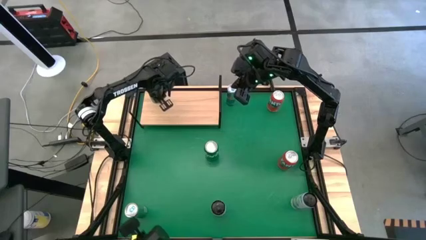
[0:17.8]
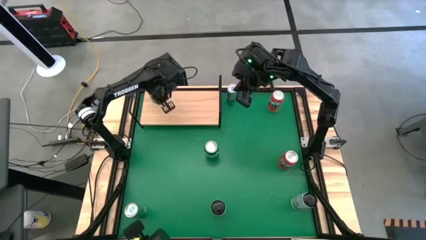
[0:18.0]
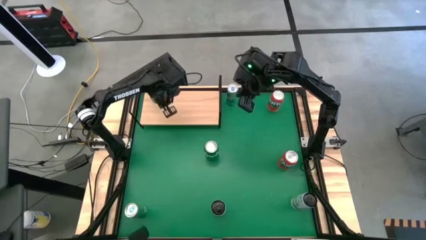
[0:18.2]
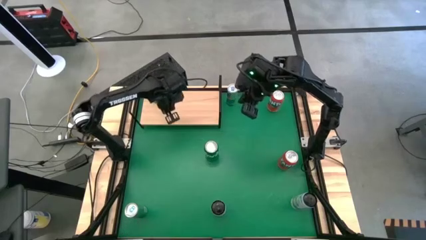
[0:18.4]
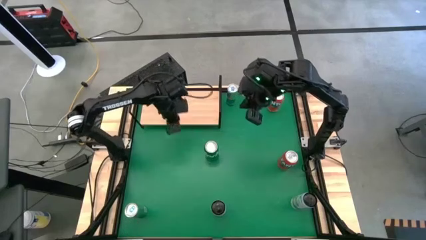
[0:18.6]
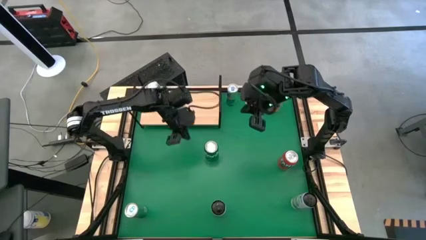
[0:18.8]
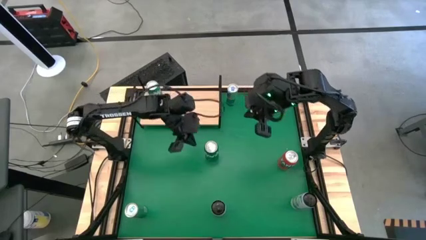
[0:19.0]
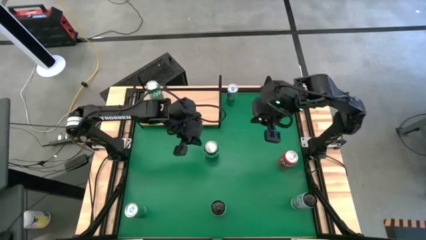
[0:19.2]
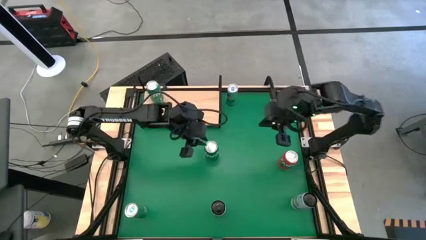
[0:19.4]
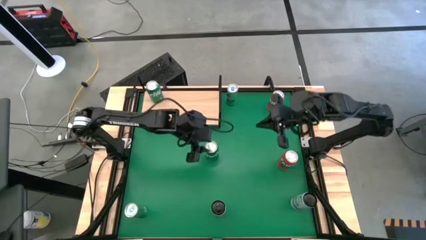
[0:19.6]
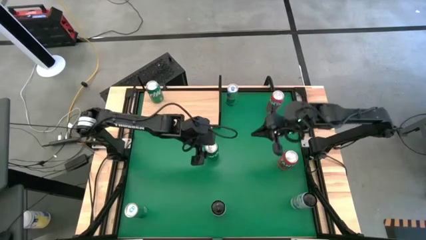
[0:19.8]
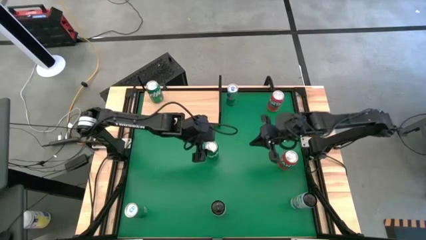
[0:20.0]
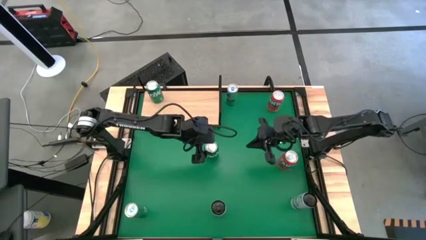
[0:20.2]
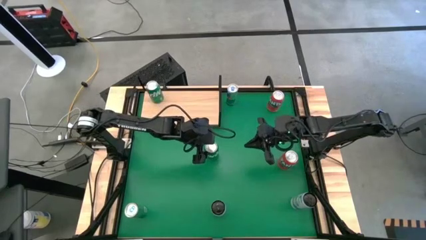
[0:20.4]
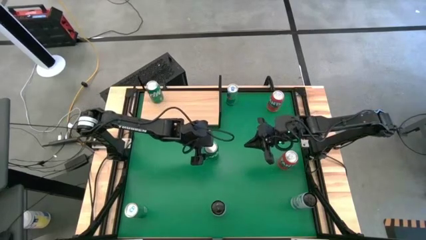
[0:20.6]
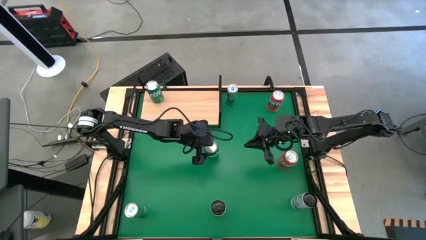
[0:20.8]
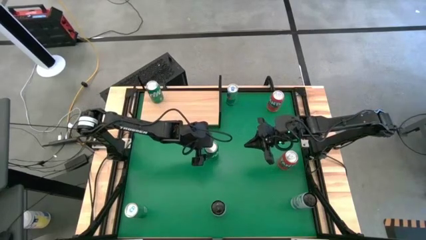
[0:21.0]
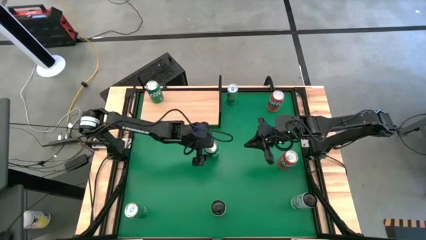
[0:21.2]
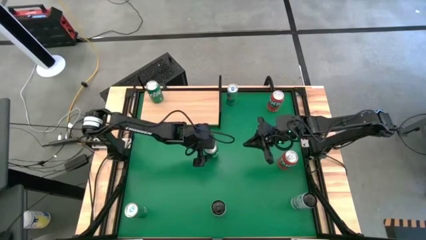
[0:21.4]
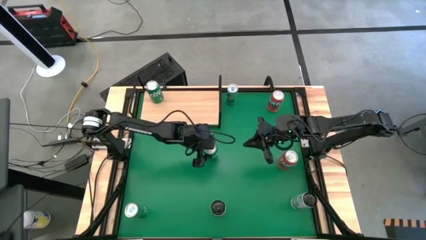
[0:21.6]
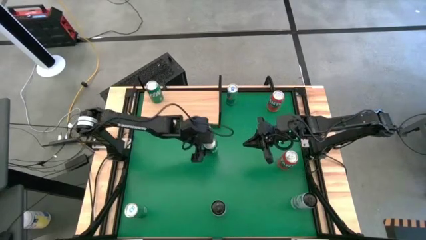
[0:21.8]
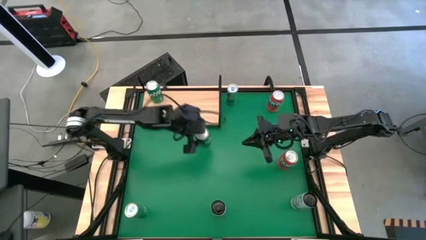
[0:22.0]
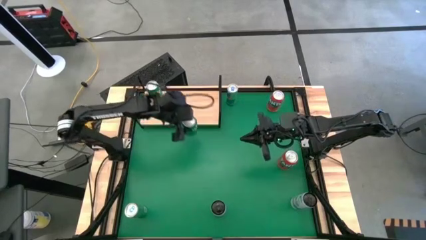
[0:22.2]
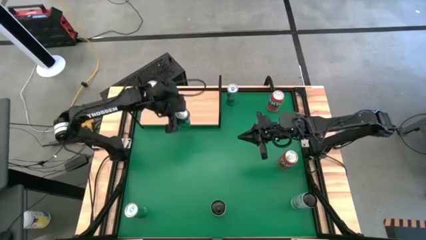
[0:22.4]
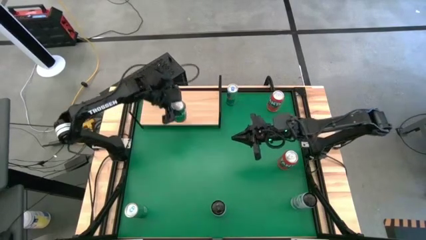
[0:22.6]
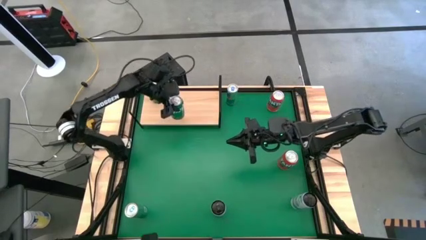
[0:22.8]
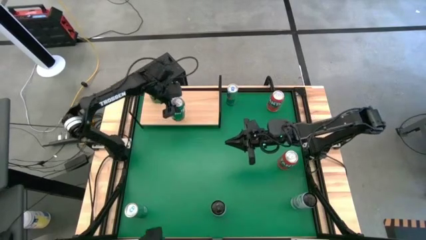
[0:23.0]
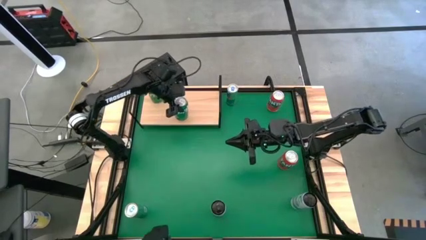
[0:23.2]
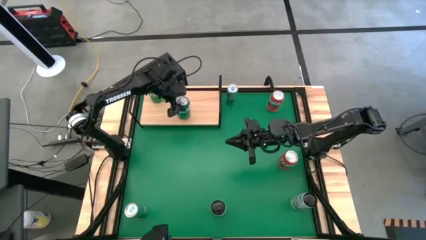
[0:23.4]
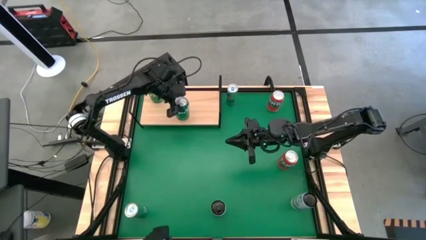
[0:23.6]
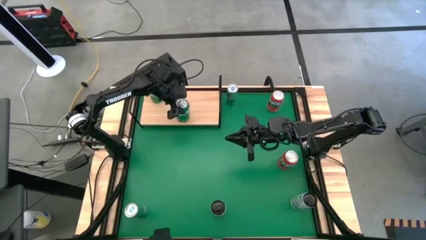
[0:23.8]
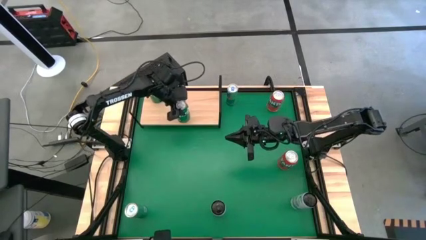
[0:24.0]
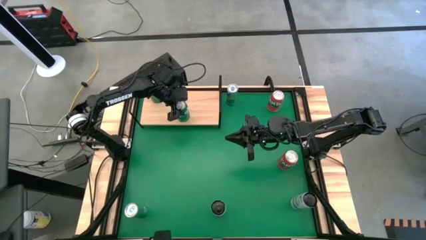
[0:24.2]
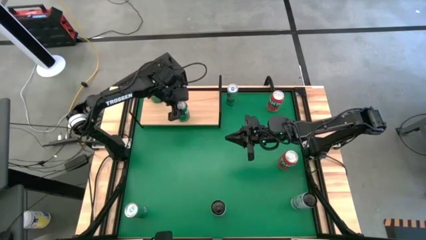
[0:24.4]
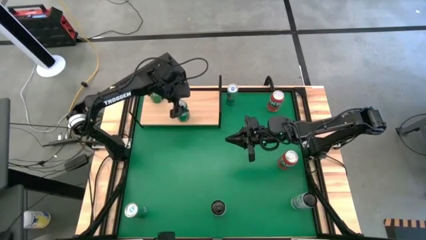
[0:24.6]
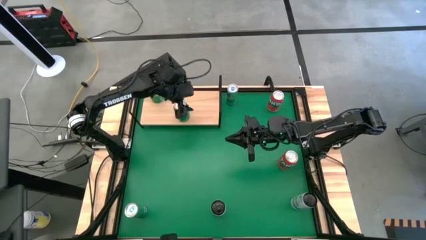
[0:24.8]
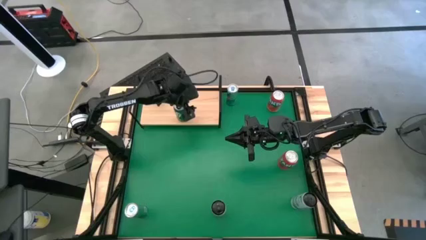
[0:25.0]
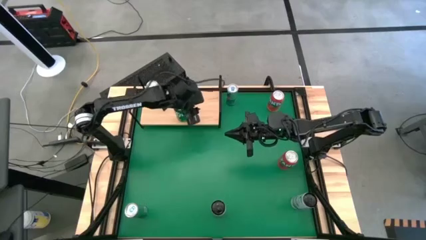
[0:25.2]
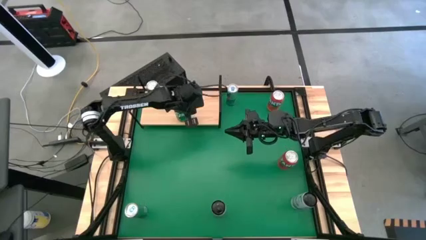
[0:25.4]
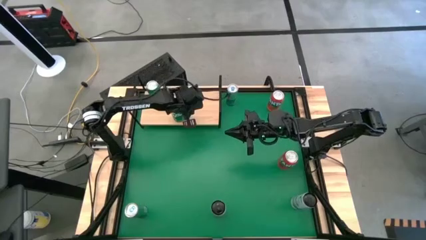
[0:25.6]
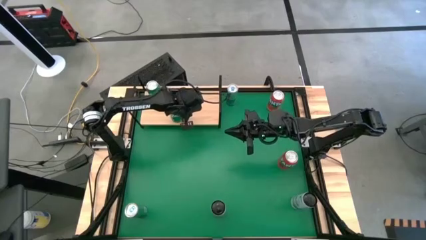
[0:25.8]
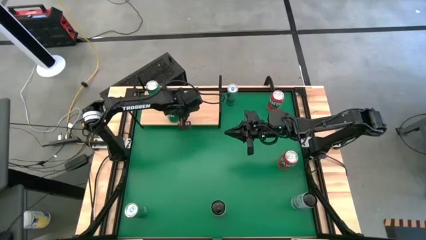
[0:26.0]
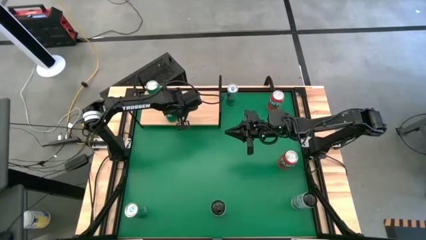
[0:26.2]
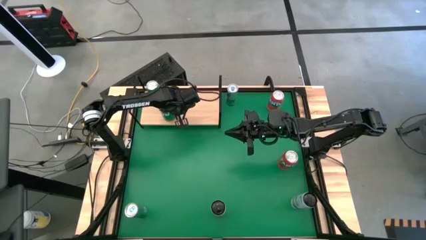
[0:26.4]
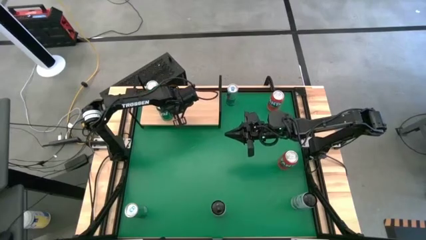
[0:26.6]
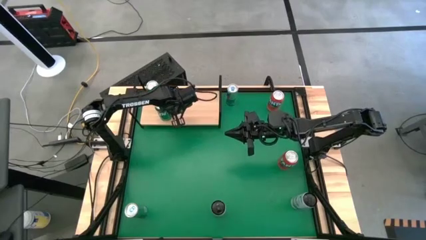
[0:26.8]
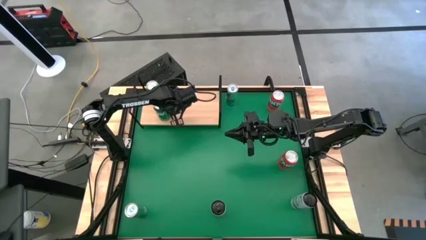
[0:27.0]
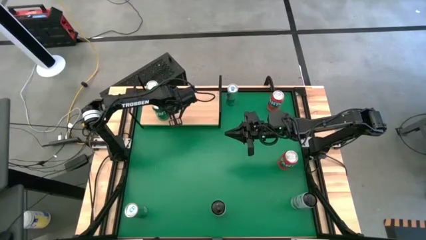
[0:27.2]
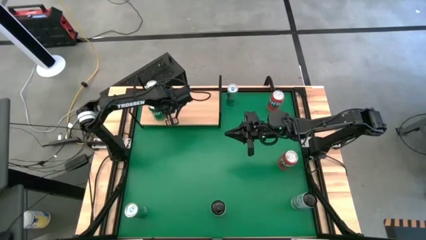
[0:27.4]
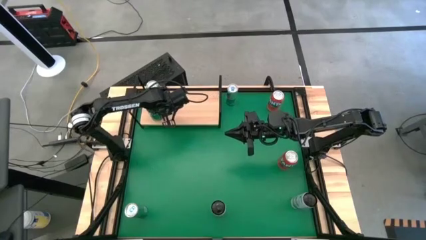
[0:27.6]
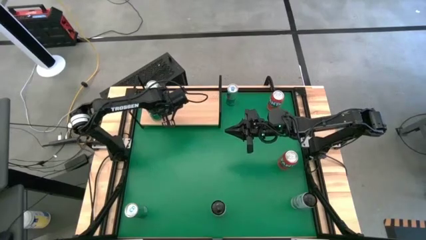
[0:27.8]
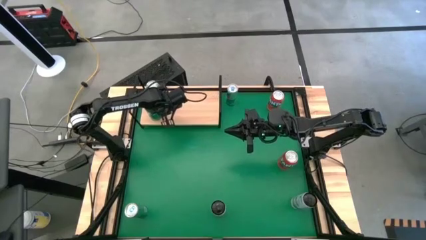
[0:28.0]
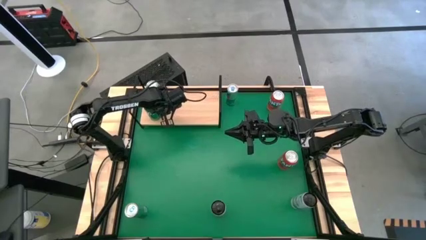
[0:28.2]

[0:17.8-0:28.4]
Task: Place canned beverage on shelf
Put the green soda can on the shelf aligned with the other green soda can
